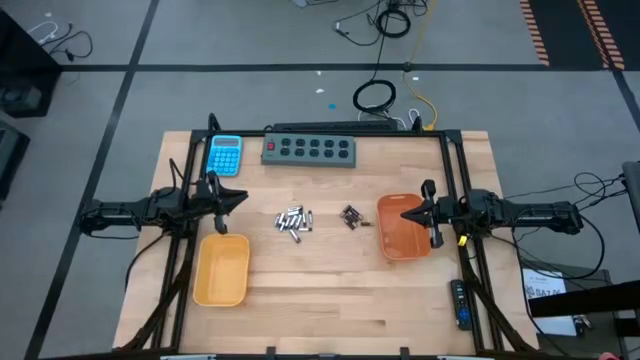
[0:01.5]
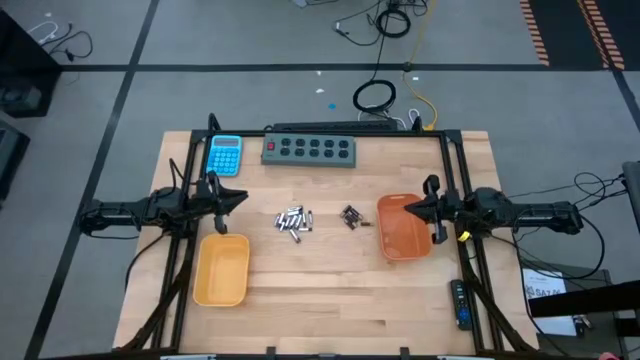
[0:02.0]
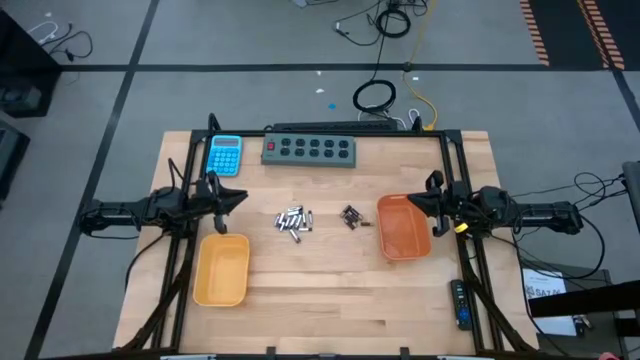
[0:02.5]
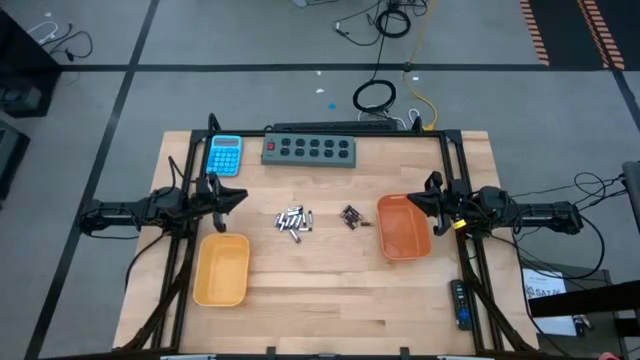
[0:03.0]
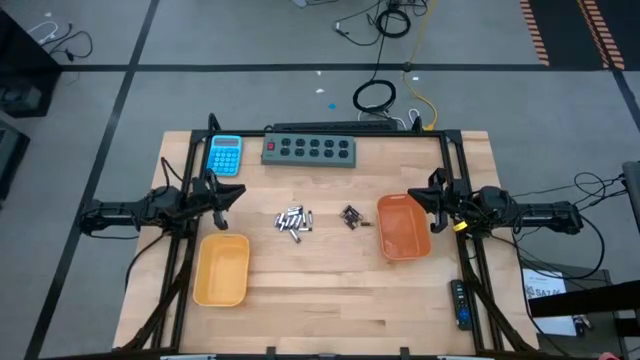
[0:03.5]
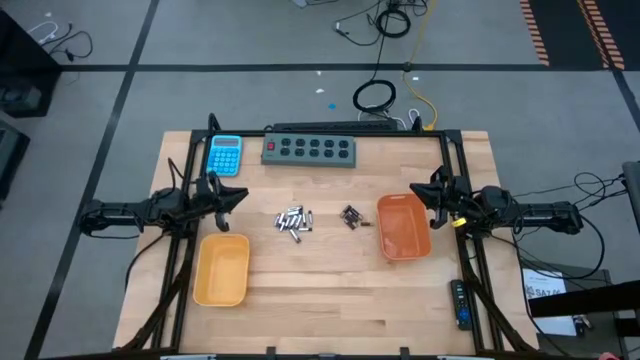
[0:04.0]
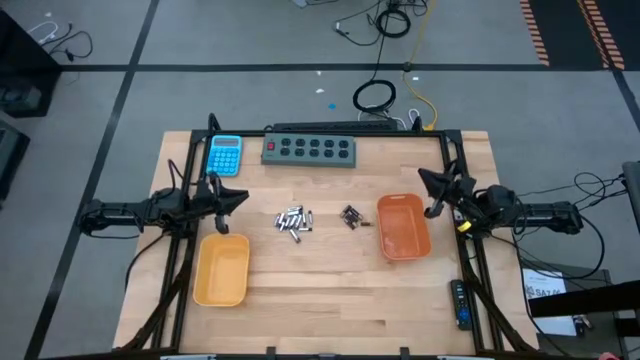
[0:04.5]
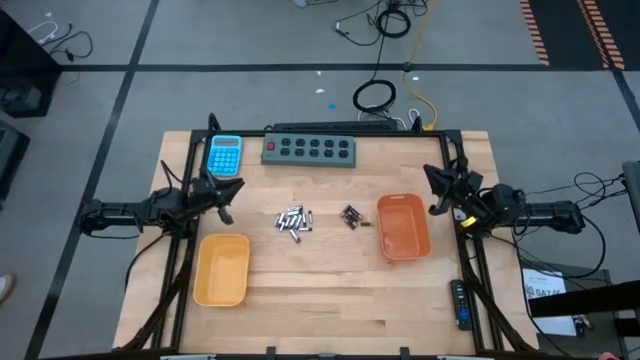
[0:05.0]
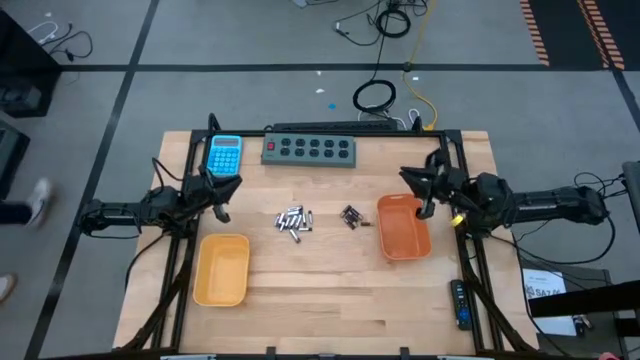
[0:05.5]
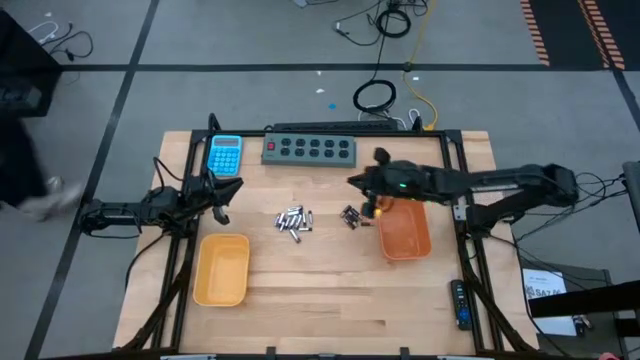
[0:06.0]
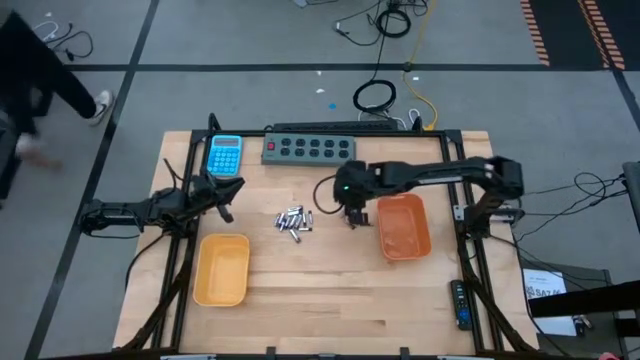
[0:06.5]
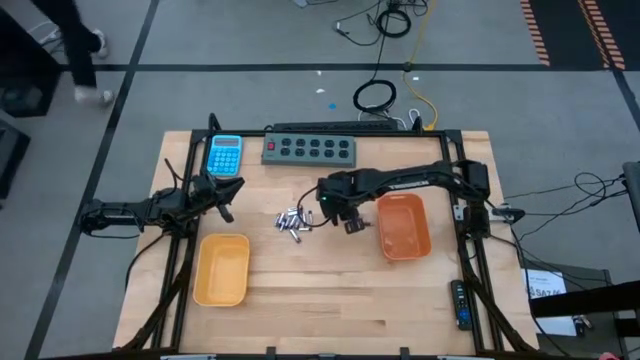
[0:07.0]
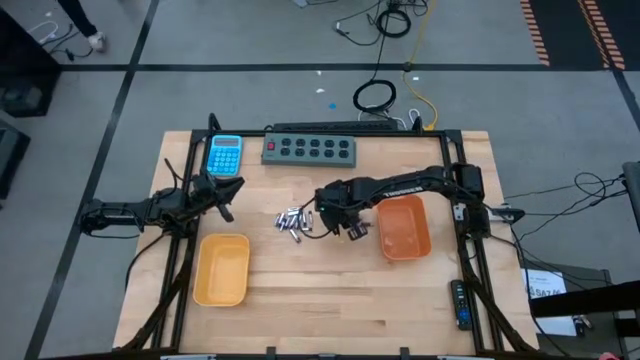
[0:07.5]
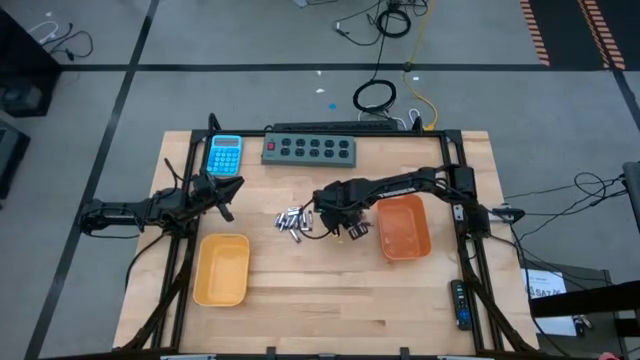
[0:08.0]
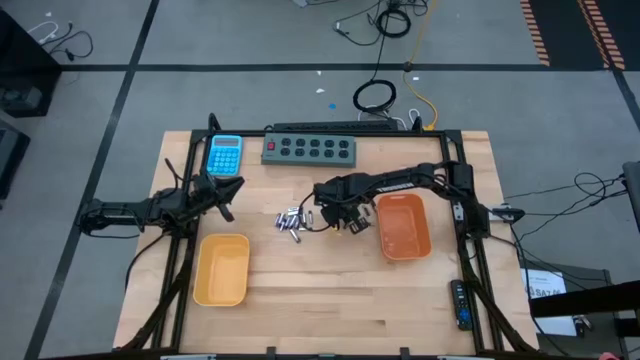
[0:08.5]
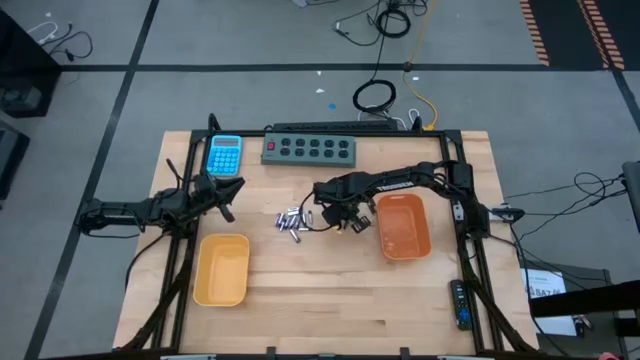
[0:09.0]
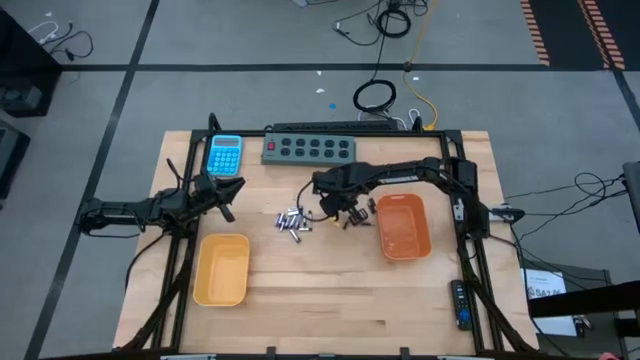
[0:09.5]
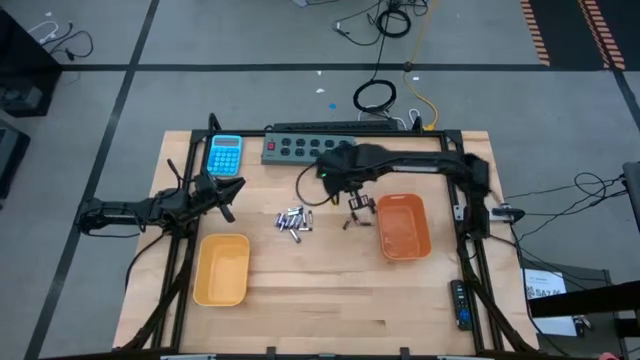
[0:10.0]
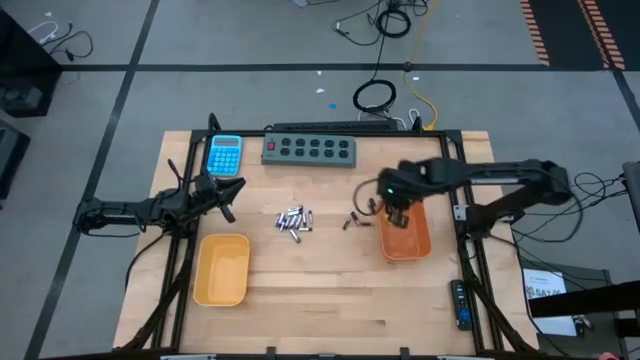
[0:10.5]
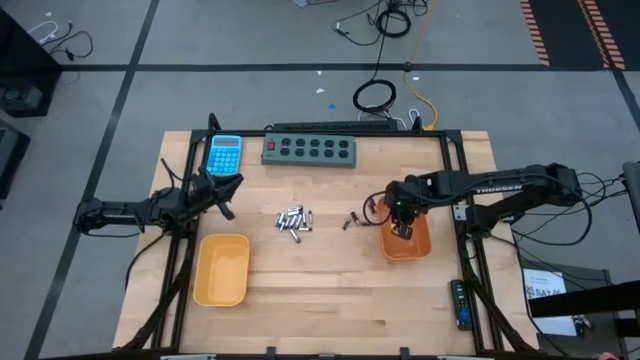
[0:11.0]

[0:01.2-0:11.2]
Task: Sort batteries
Put the black battery into the orange bin

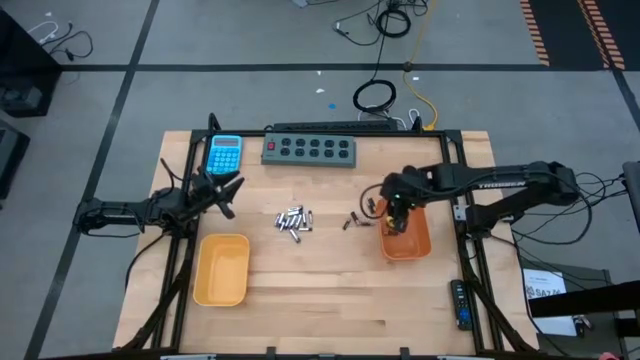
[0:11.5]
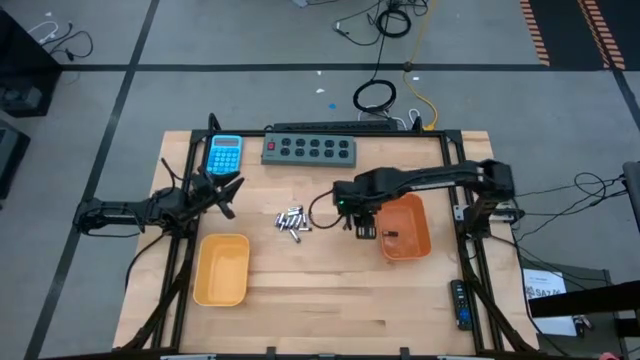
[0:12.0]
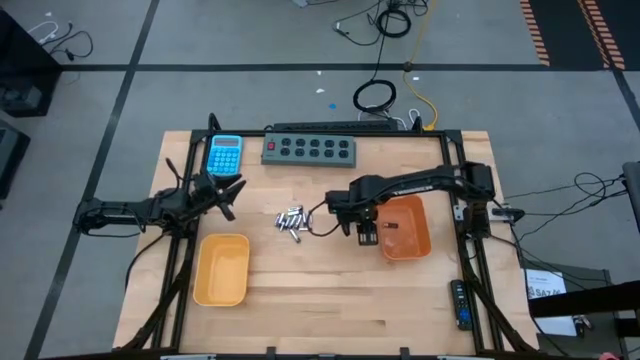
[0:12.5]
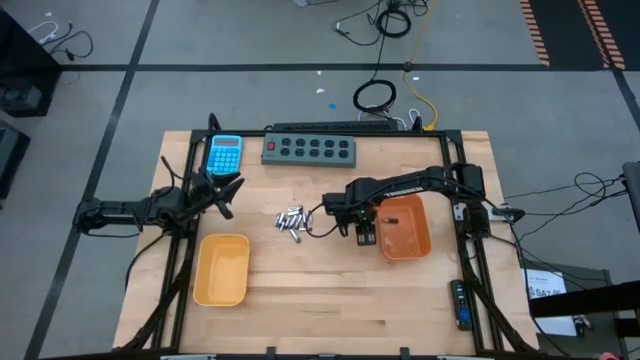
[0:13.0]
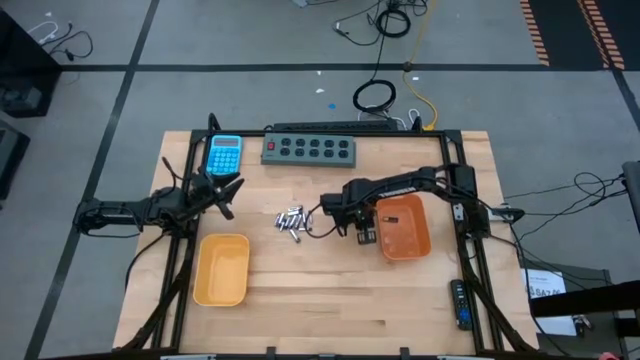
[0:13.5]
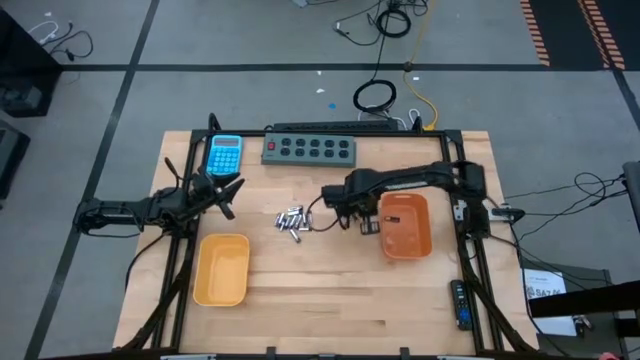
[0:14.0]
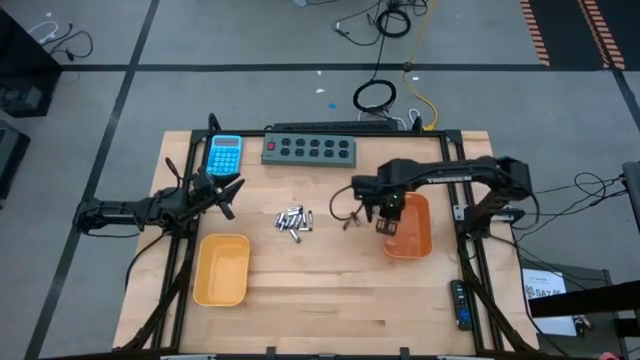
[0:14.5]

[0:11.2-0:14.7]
Put the black battery into the orange bin

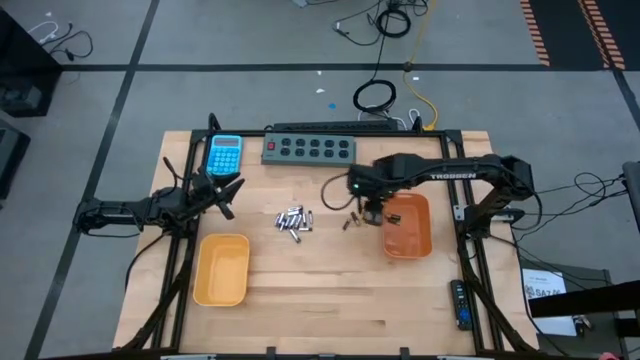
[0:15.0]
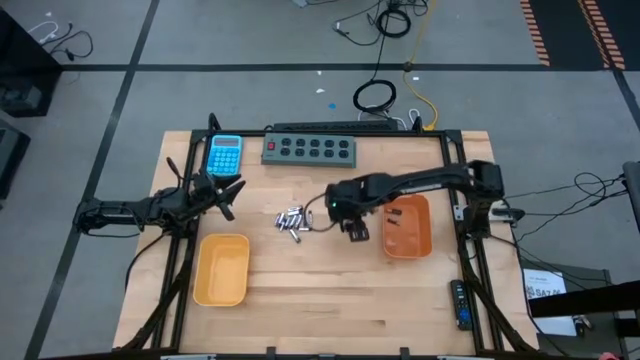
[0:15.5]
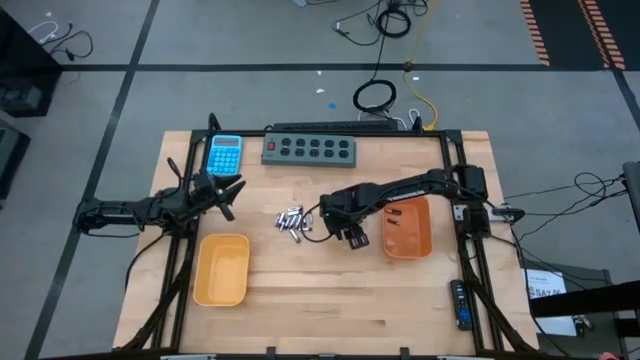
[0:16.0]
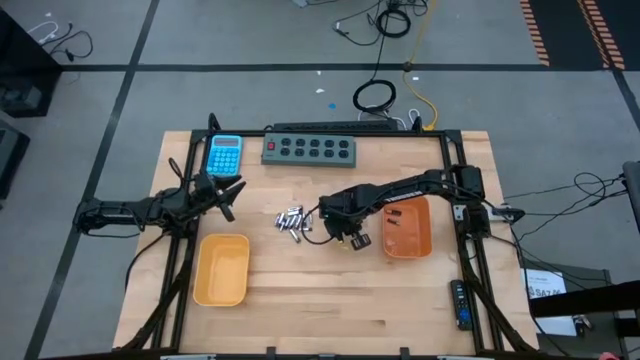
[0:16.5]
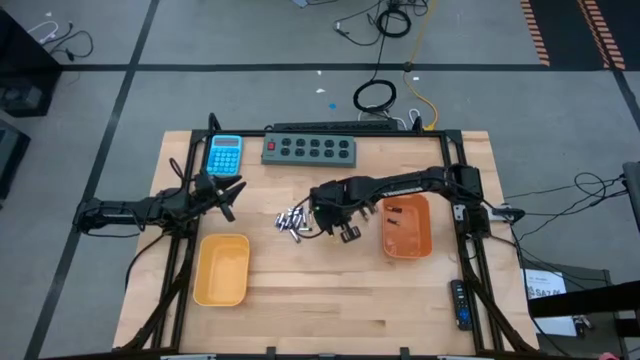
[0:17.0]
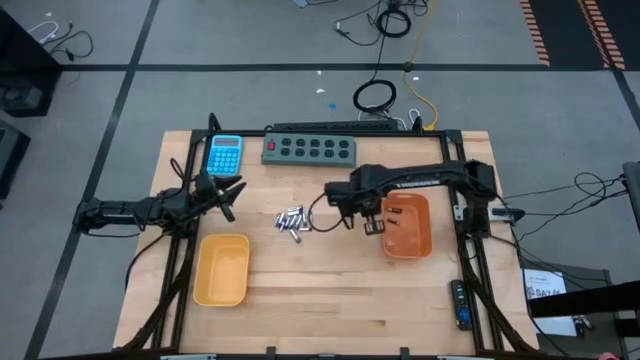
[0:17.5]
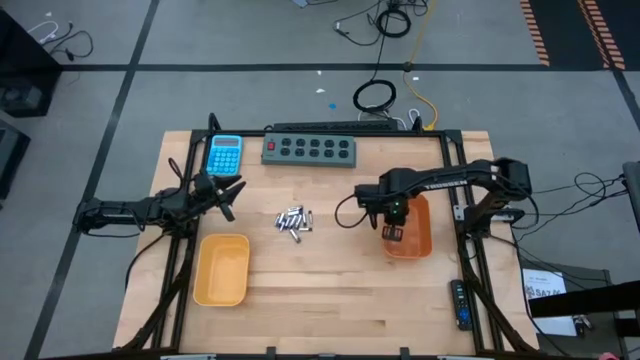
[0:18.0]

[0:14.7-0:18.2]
Put the black battery into the orange bin

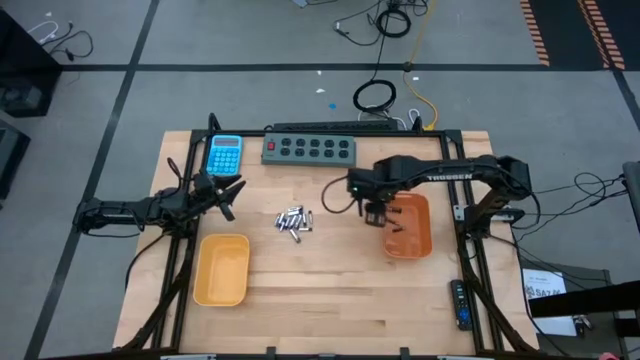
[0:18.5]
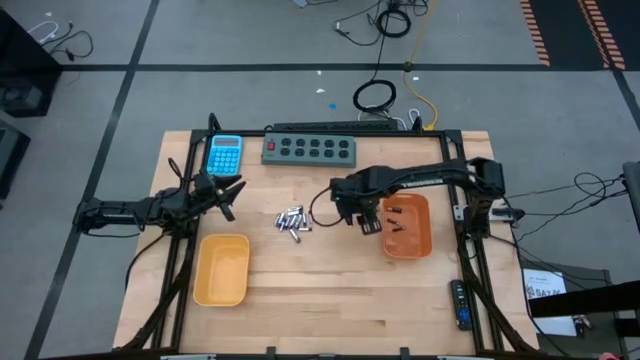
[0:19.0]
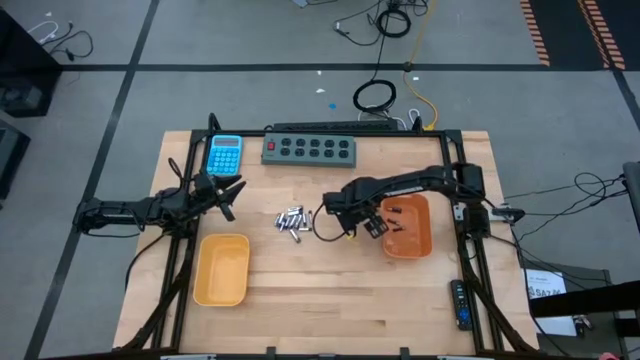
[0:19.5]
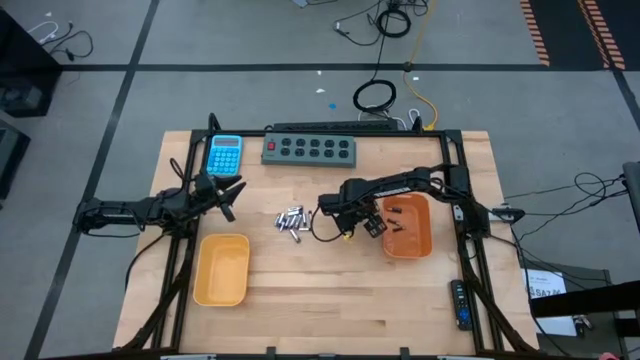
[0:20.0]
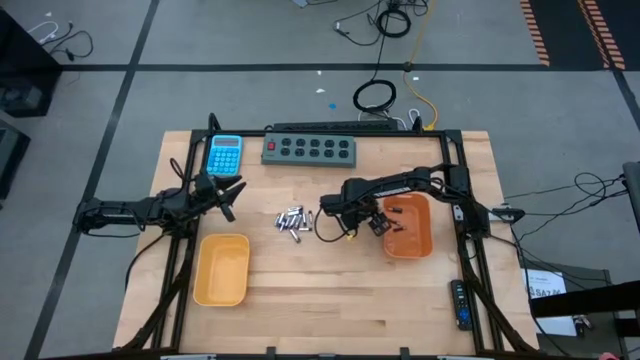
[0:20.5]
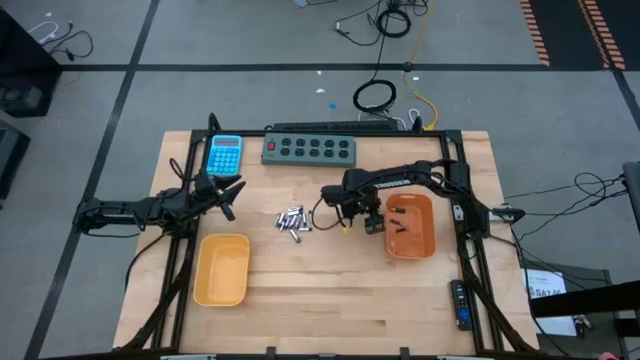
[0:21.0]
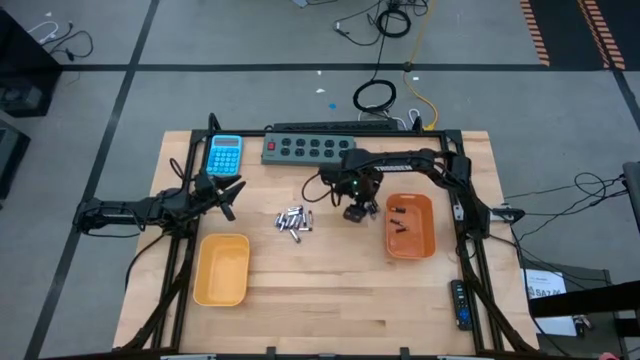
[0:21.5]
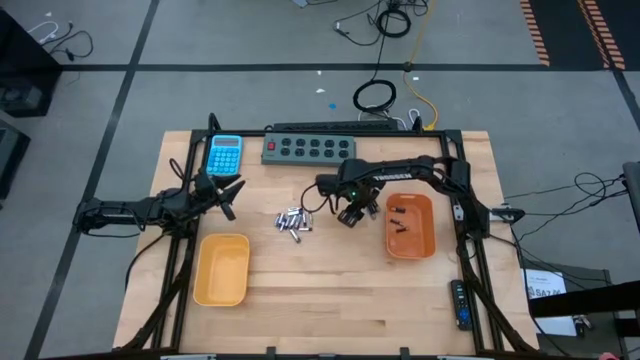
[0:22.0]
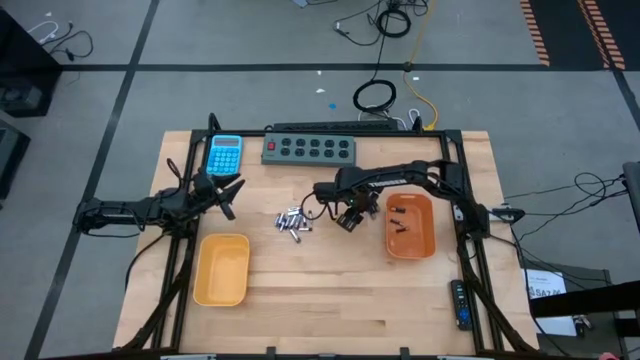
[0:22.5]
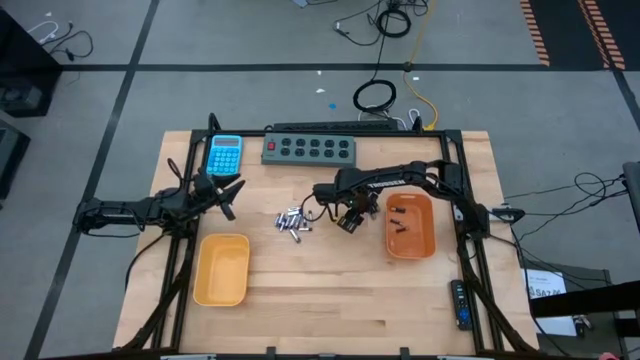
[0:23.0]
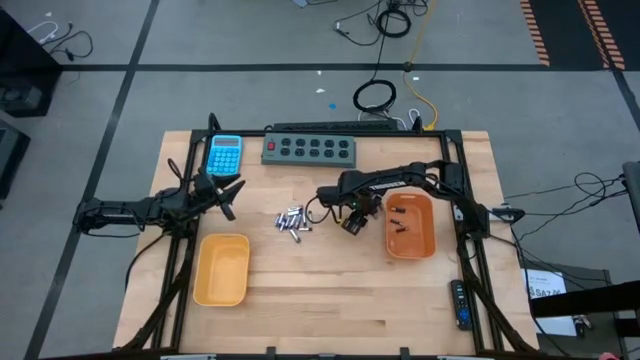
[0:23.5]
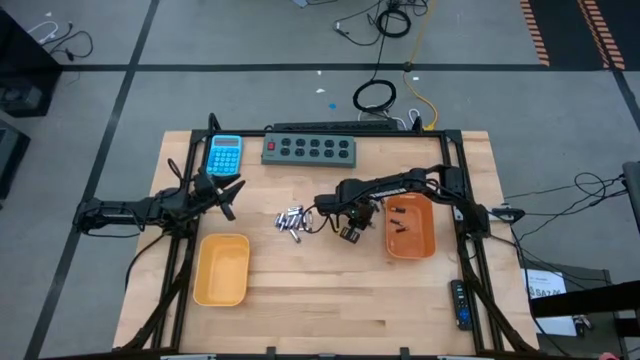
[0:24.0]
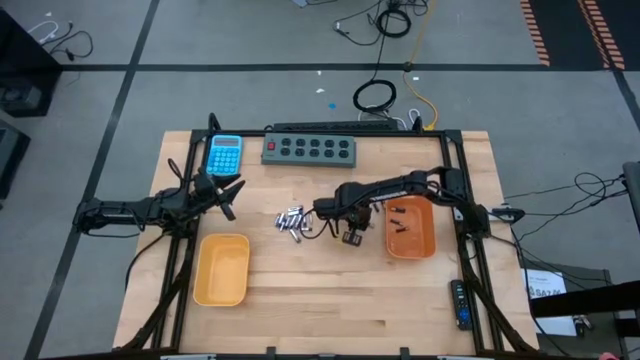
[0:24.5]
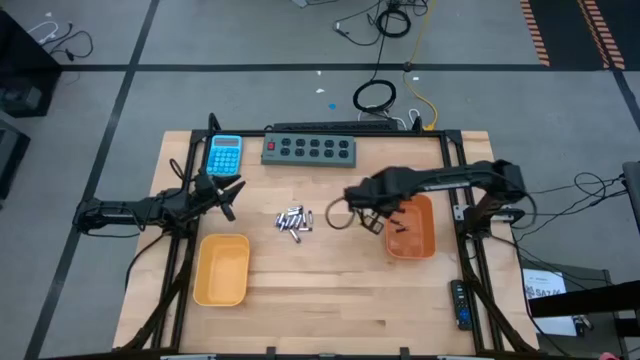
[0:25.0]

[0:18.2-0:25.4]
Put the black battery into the orange bin
